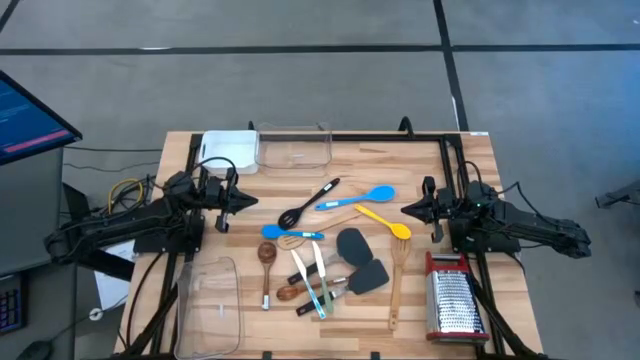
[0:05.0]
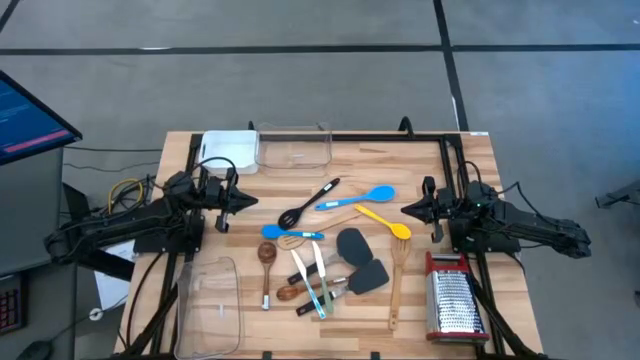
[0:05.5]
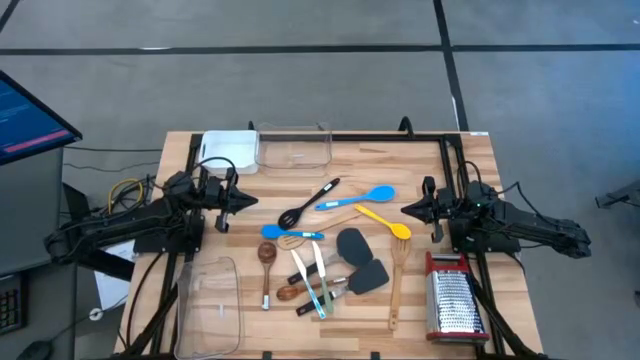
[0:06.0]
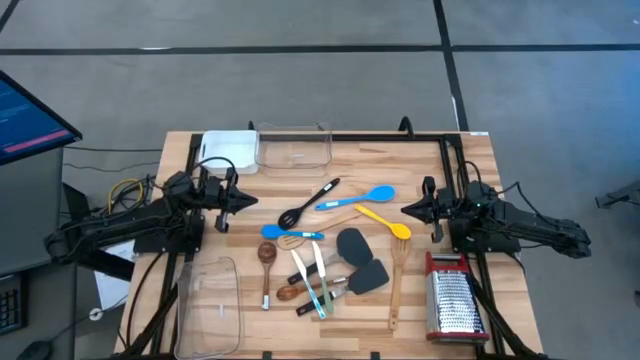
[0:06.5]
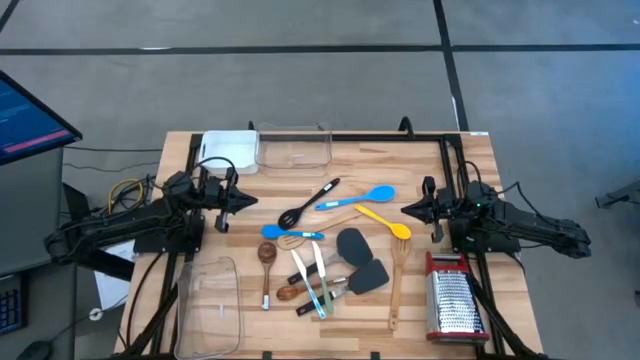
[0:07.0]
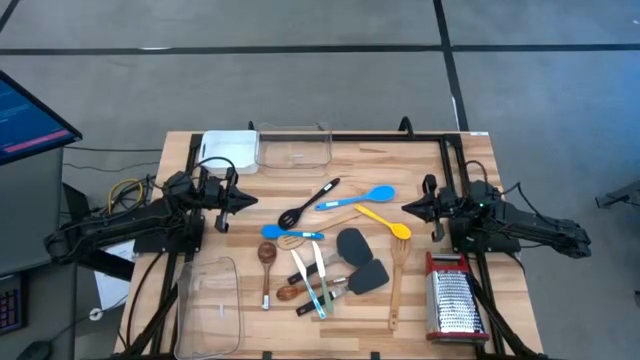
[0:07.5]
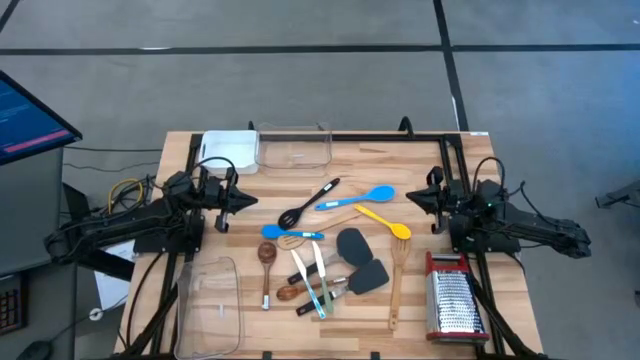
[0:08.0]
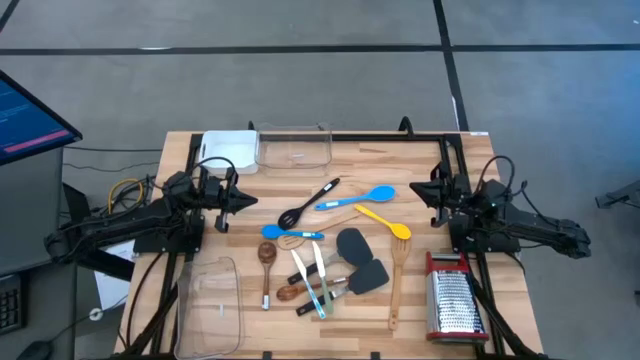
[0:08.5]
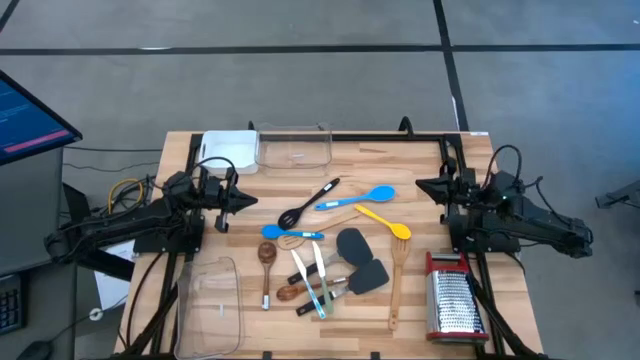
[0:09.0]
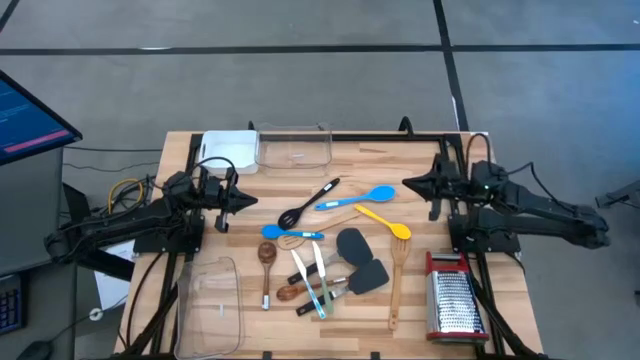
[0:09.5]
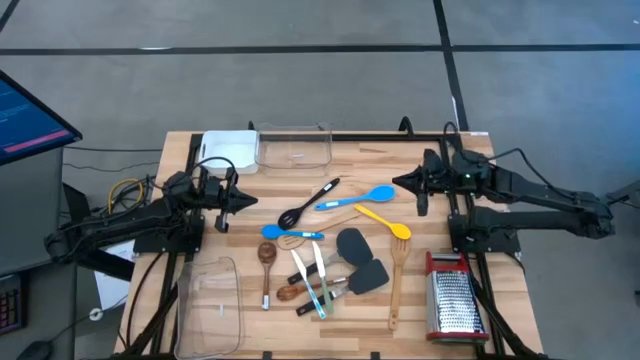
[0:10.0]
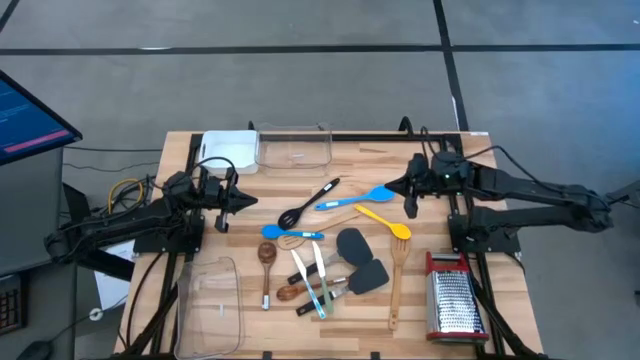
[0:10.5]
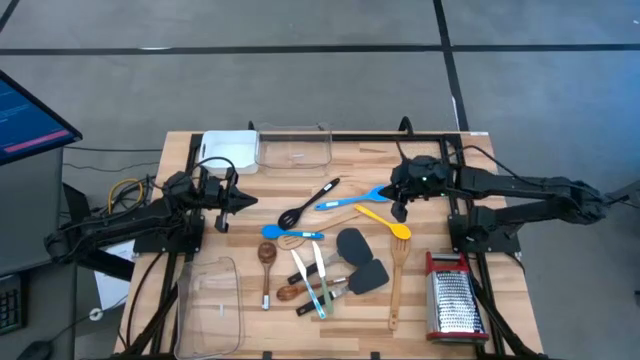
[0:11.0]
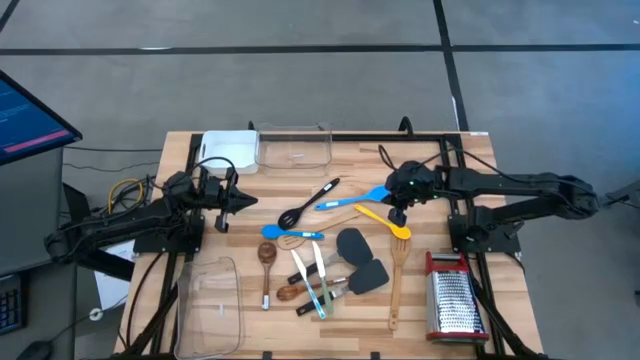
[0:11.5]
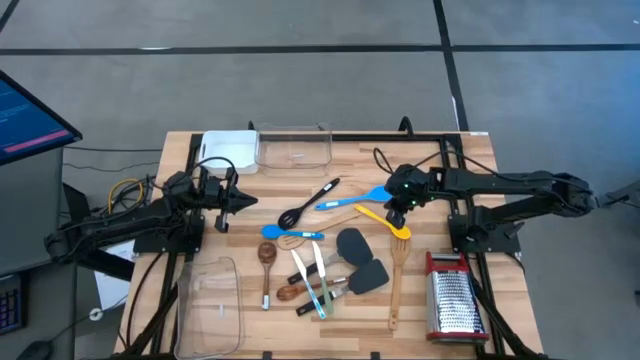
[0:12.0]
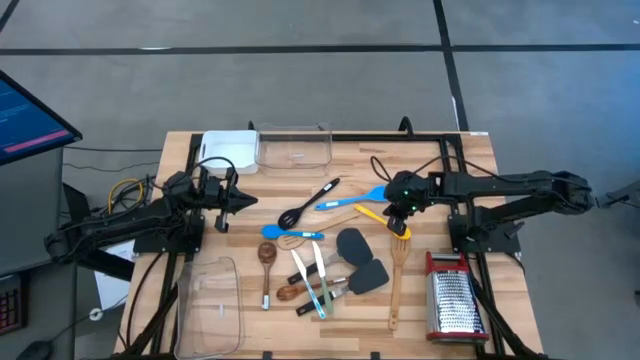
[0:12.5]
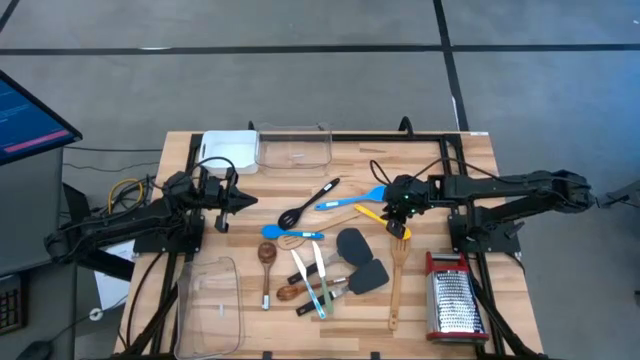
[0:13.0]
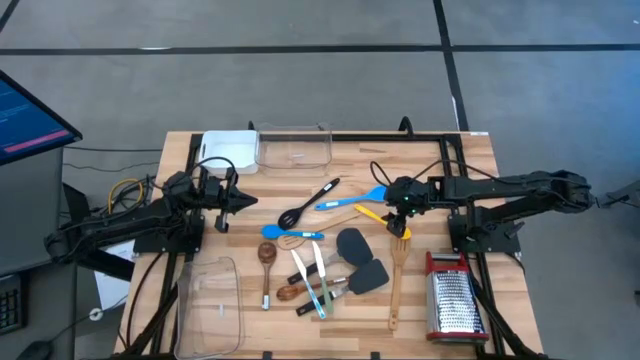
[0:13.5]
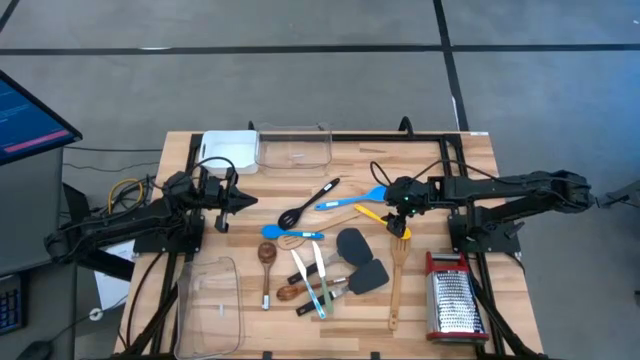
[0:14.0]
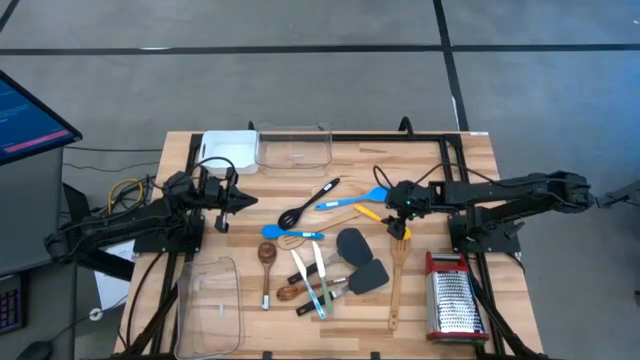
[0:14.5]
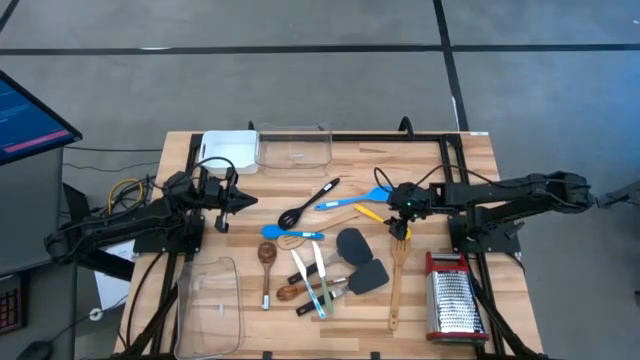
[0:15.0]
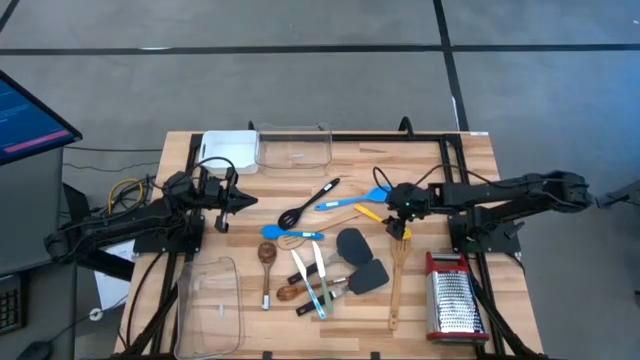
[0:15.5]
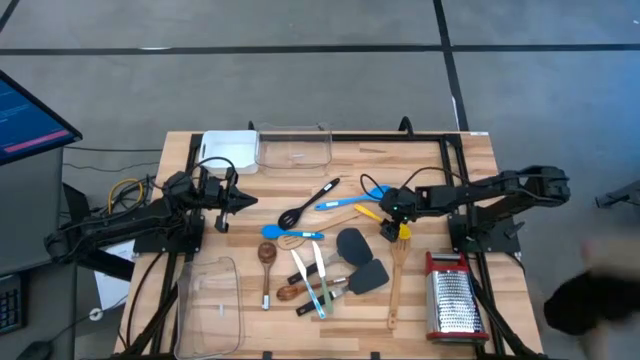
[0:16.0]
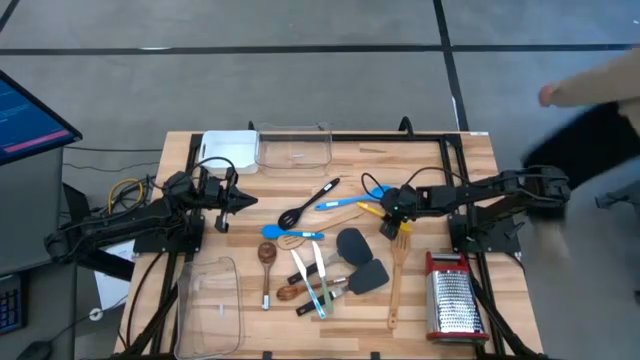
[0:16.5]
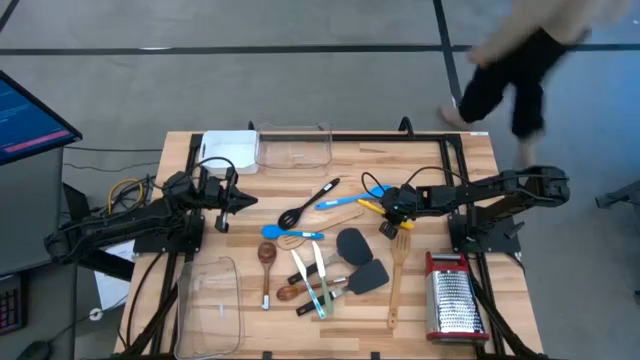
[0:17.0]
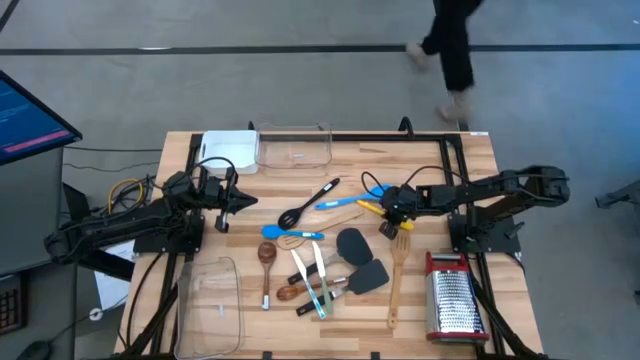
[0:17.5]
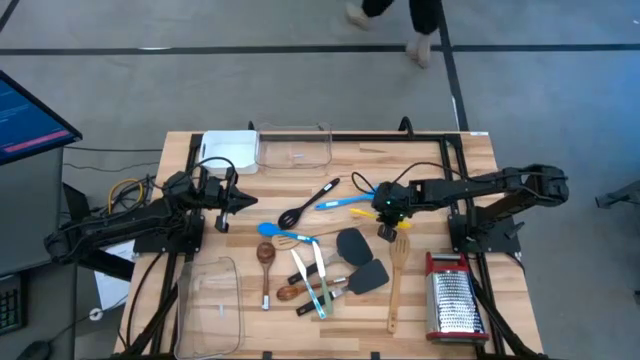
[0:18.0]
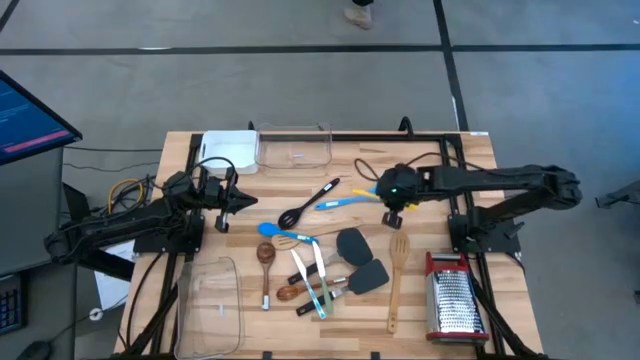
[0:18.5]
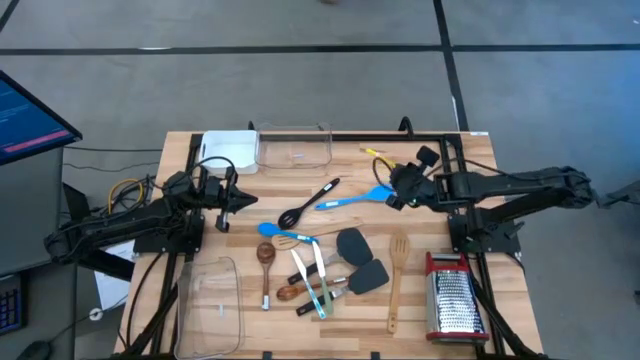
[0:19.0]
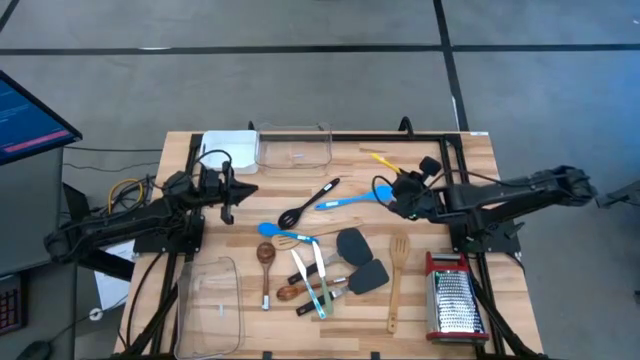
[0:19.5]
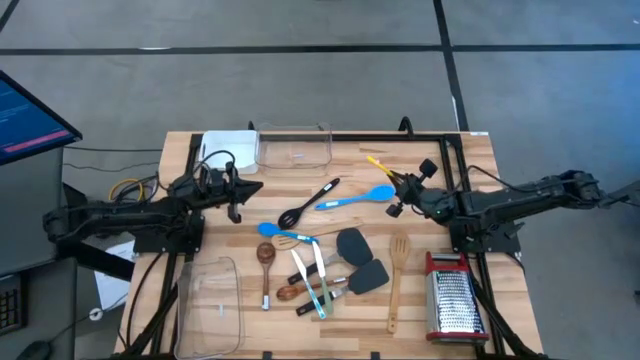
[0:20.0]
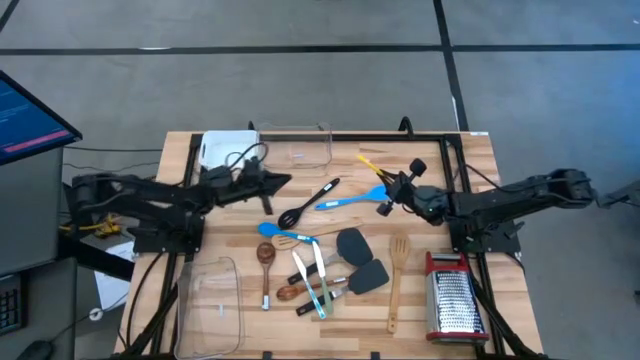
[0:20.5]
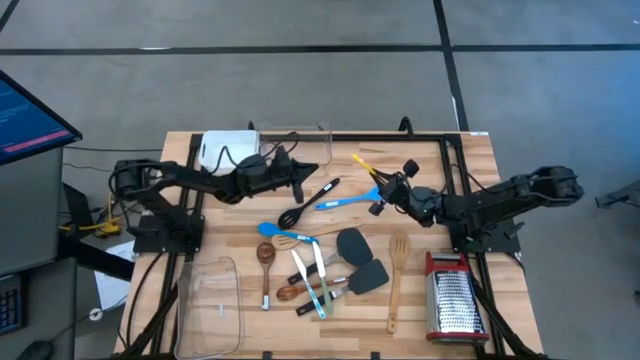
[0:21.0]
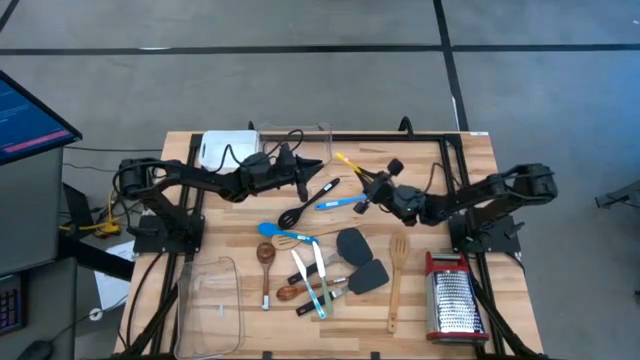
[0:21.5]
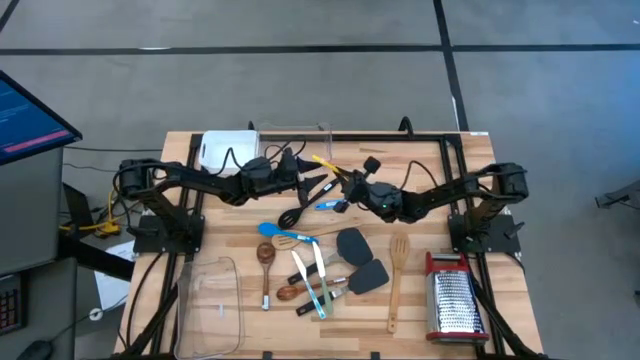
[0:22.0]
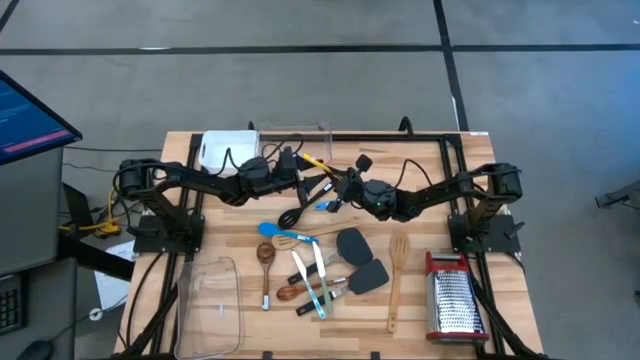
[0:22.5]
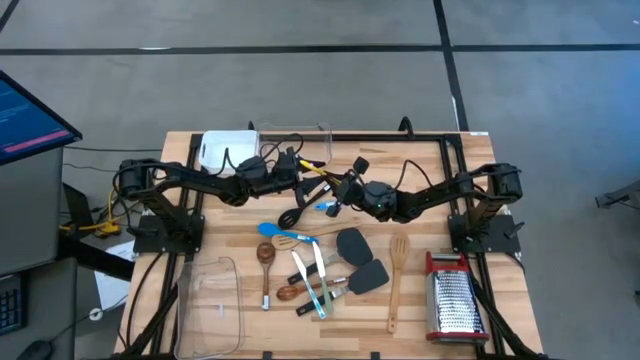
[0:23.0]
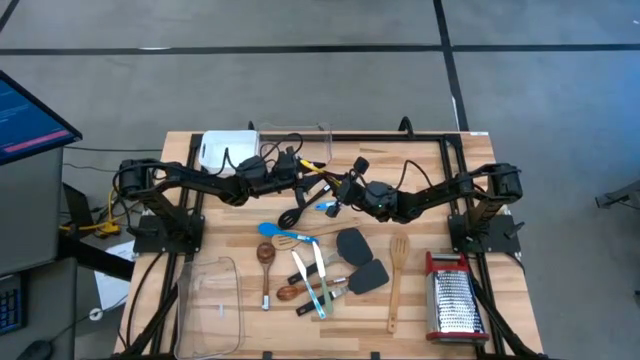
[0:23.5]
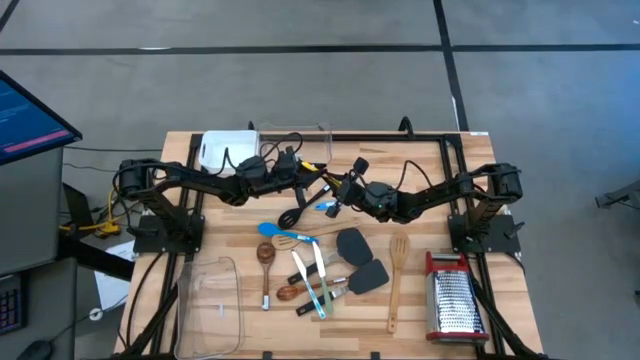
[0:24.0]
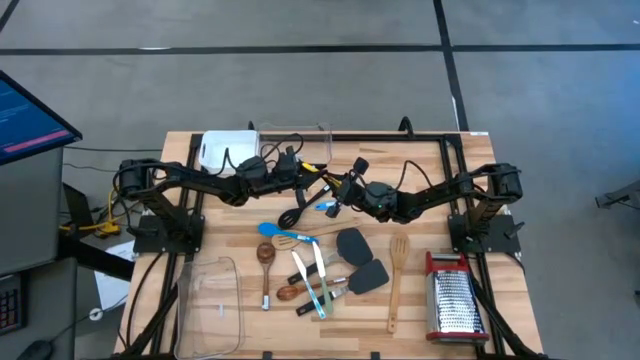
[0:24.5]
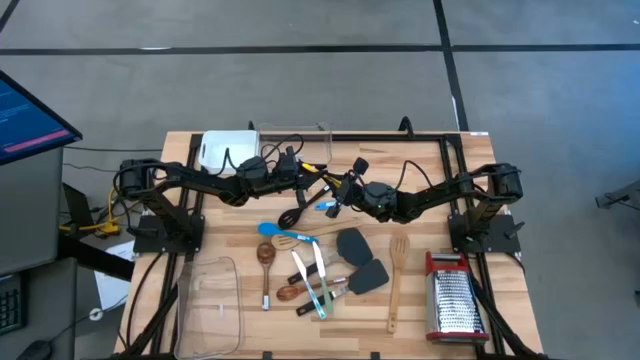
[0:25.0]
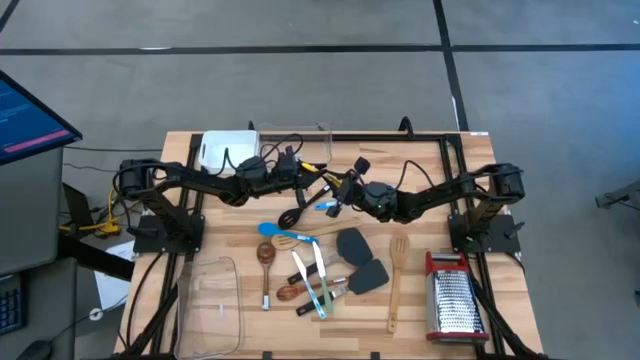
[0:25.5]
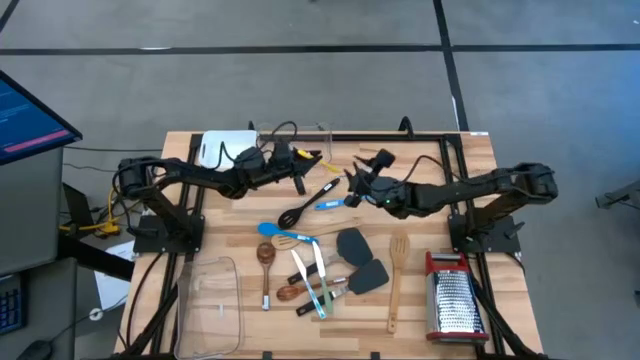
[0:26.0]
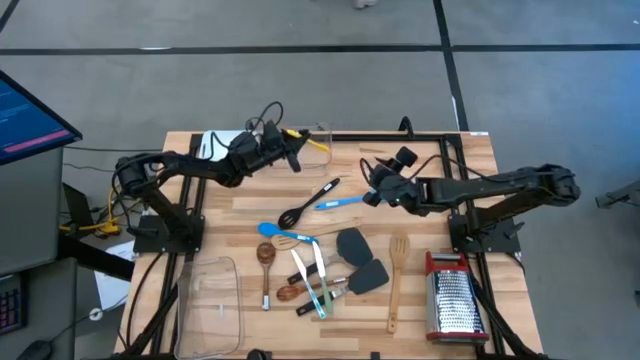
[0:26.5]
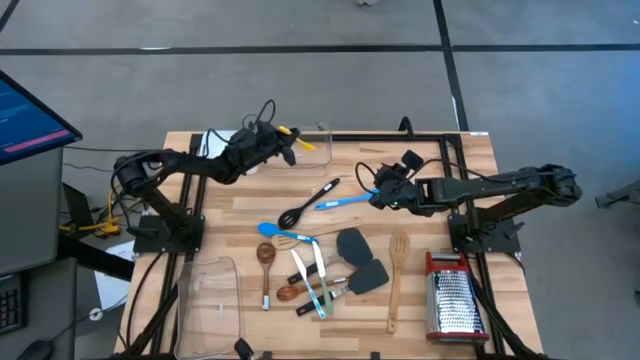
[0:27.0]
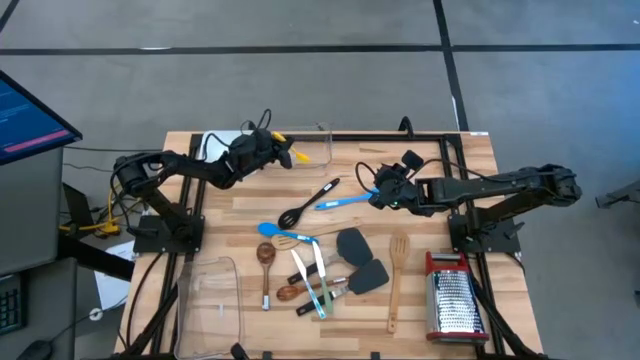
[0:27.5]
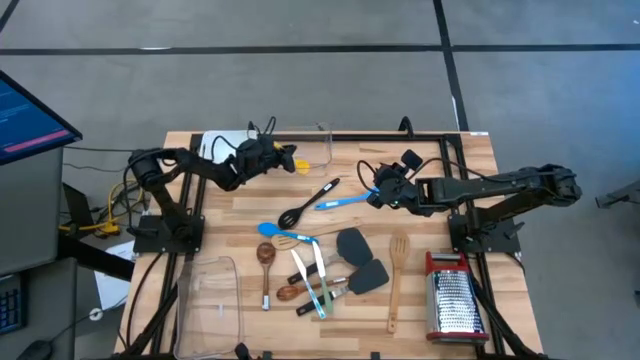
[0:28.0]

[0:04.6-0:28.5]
Task: Pick & Place Kitchen Items
Put the yellow serving spoon into the top transparent bin
